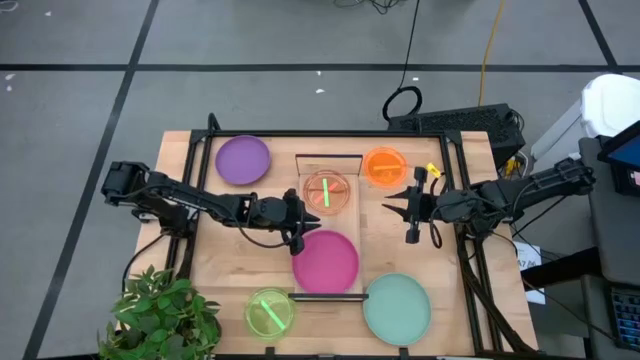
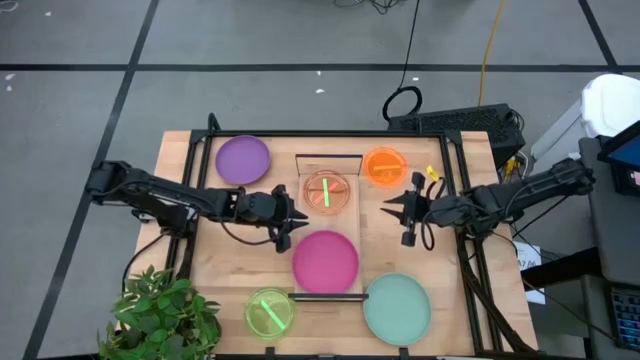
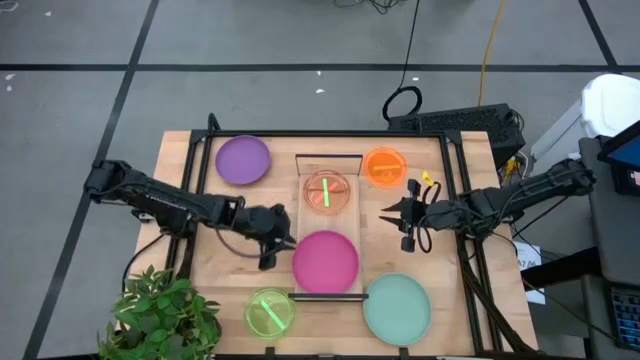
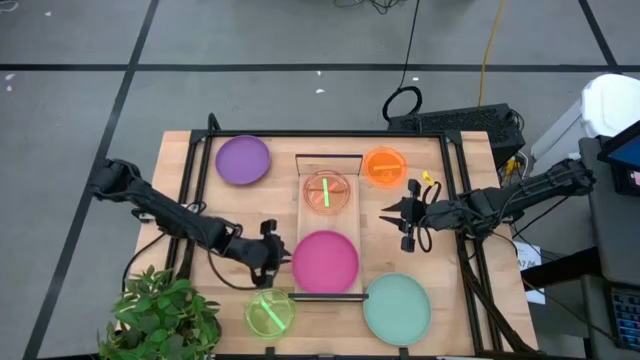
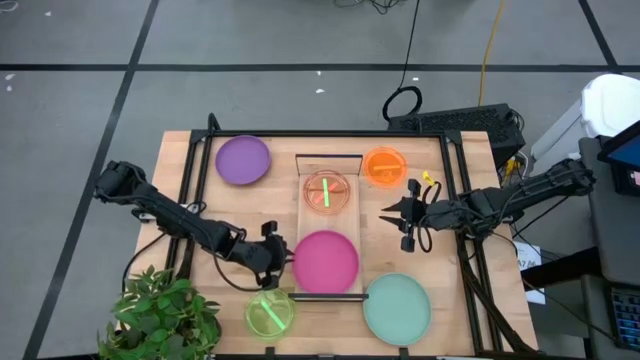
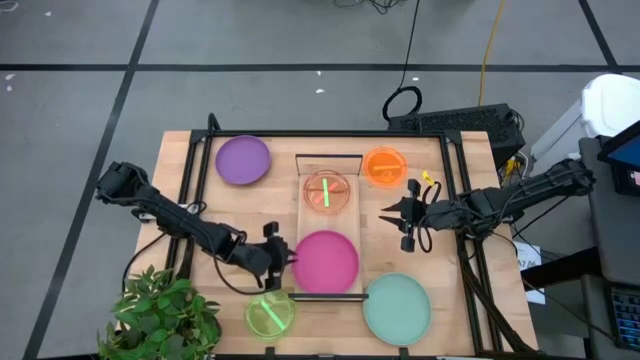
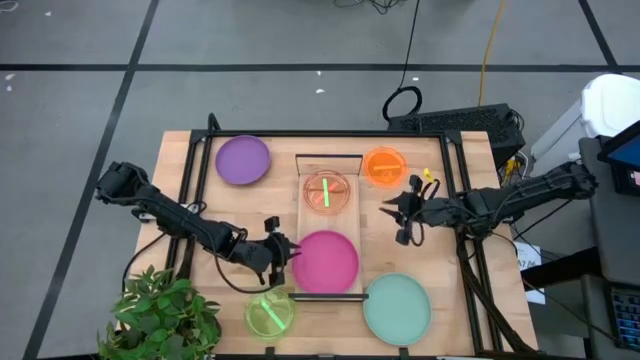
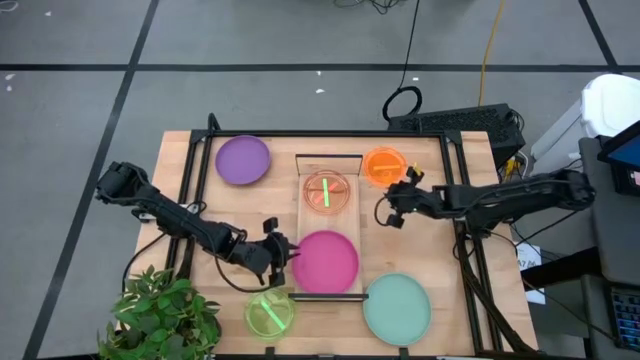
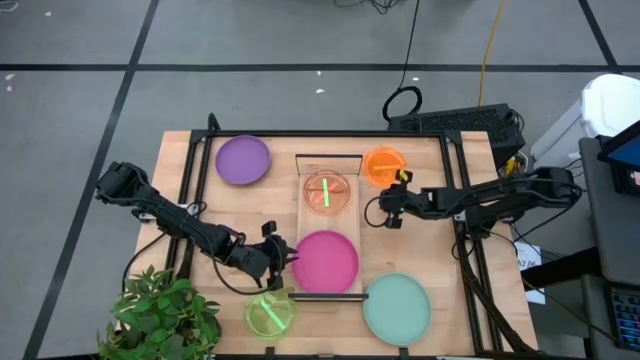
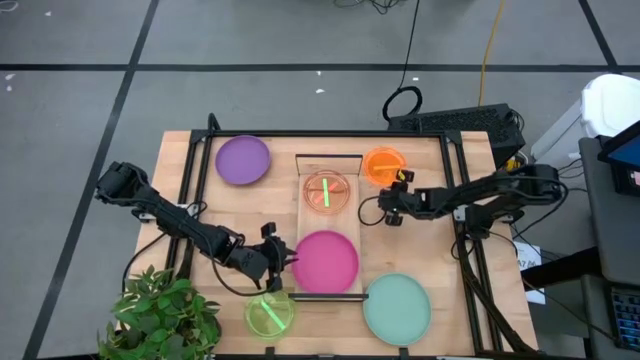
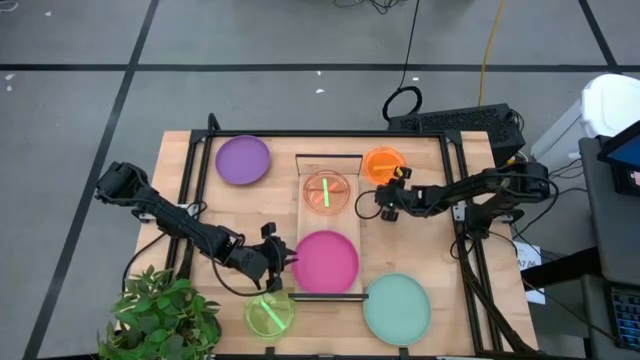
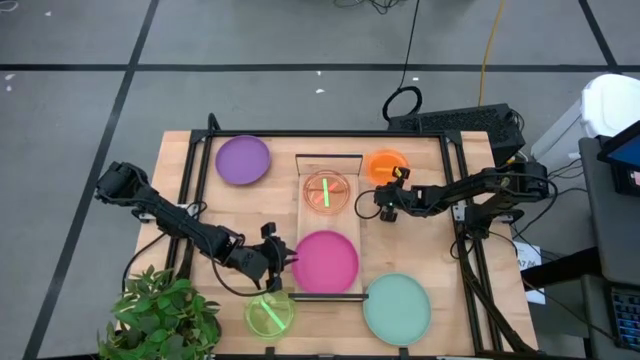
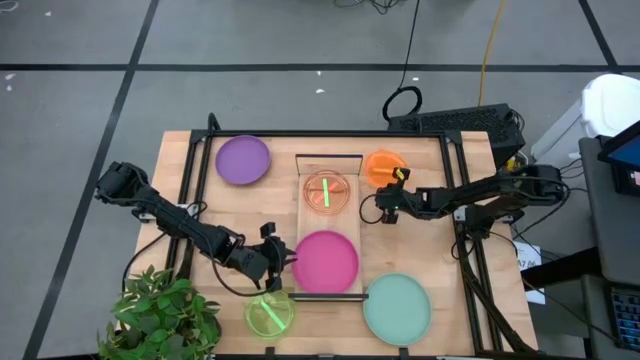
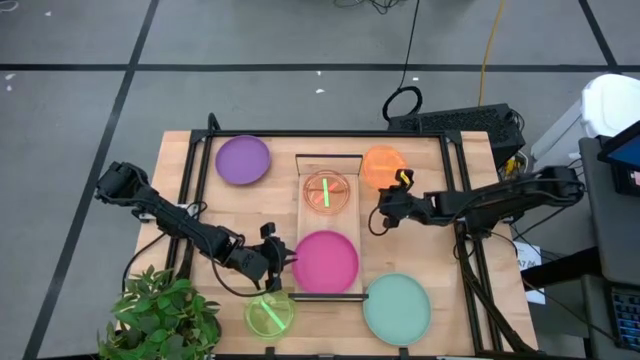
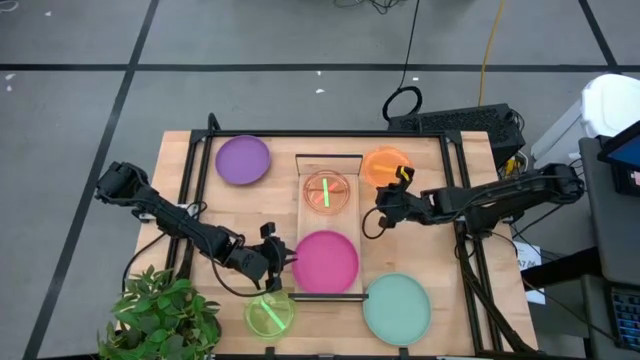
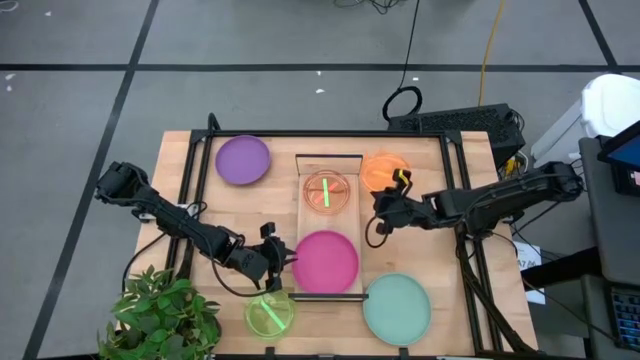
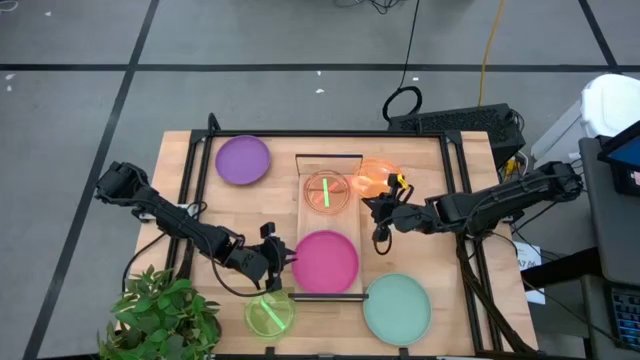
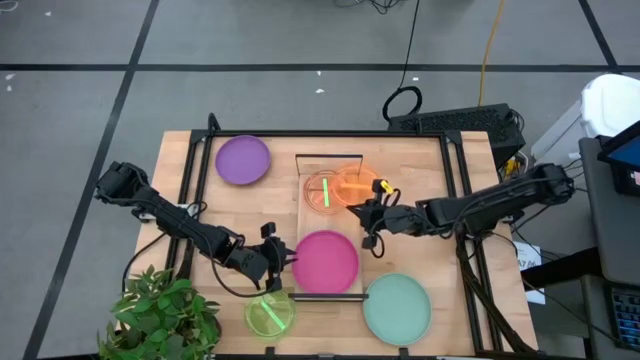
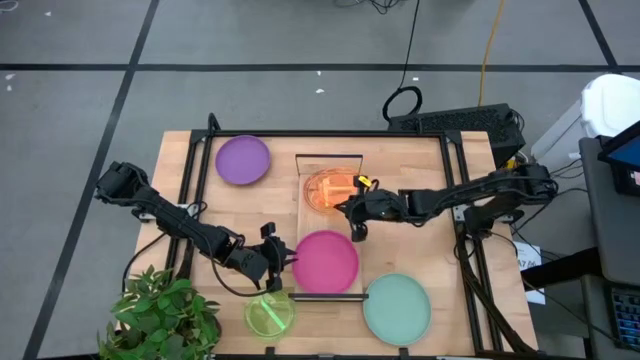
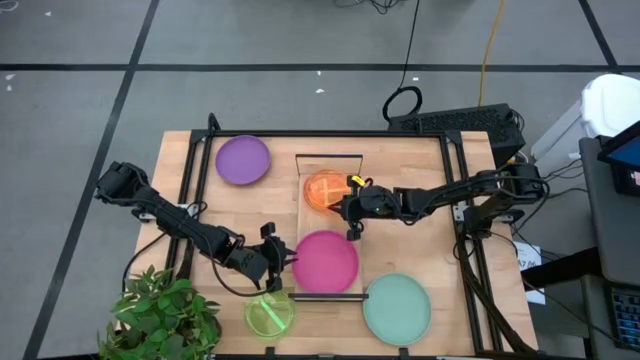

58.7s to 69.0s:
Task: Place and stack plates onto a shelf
Stack the small orange plate on top of the small green plate on the shelf

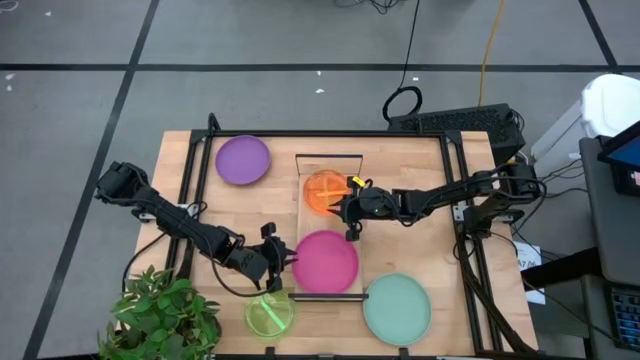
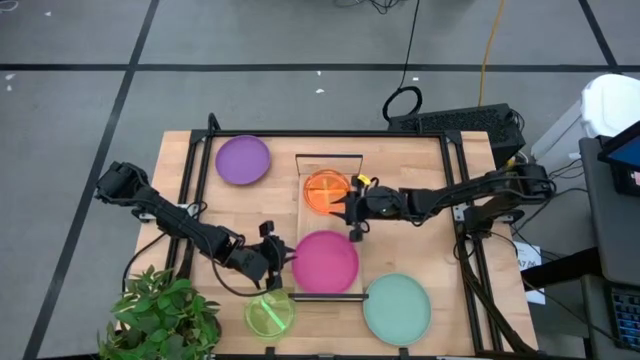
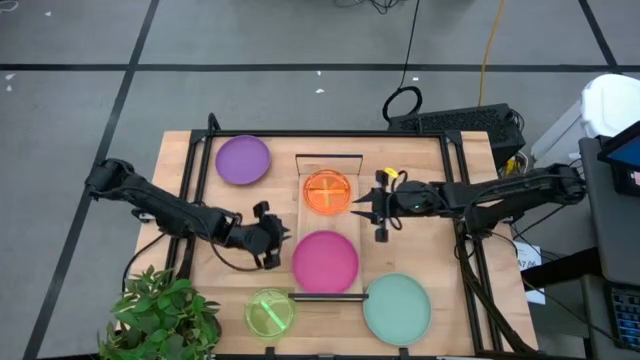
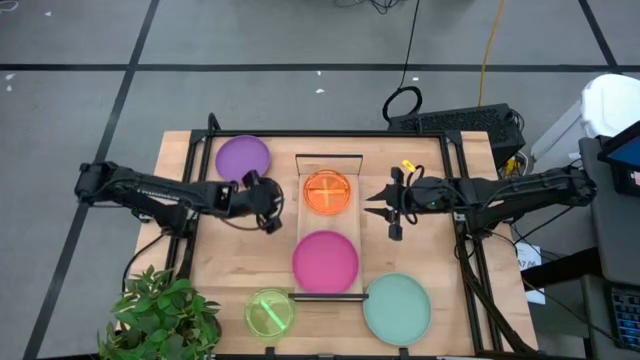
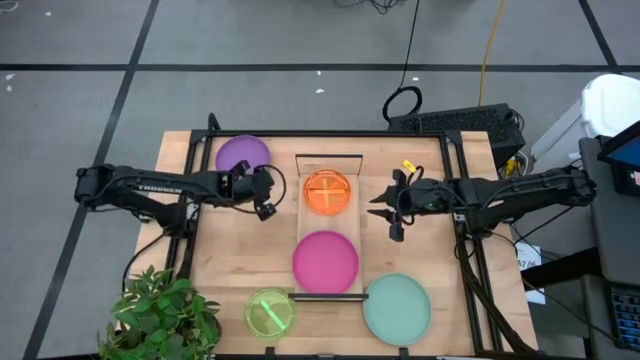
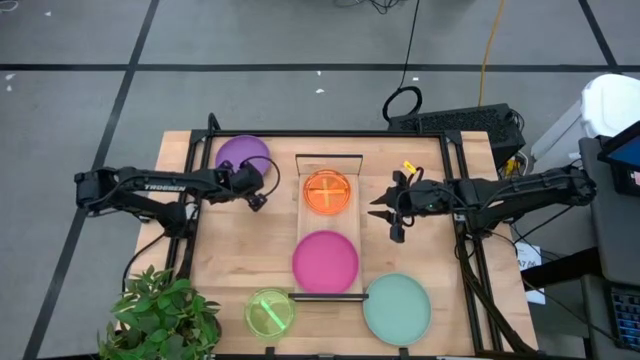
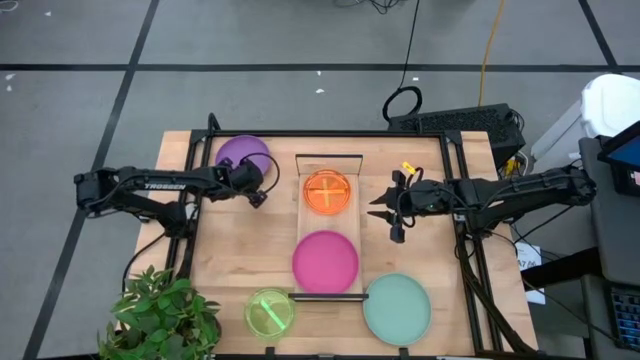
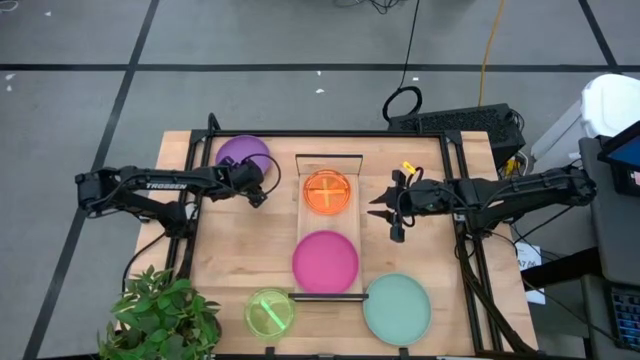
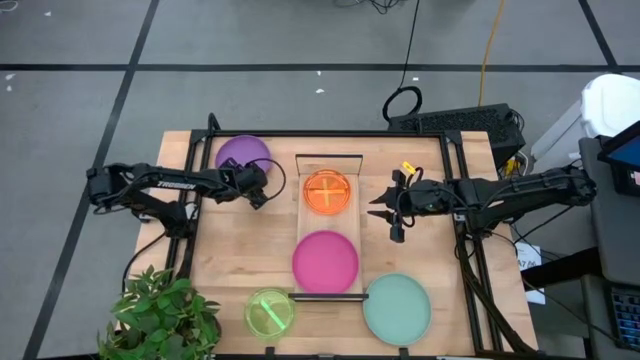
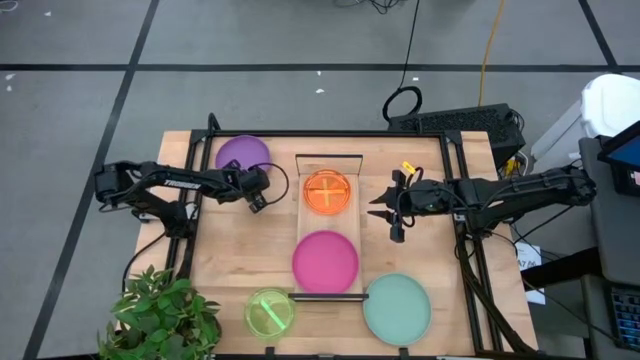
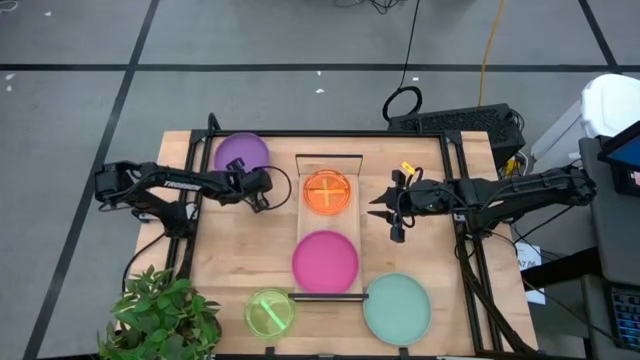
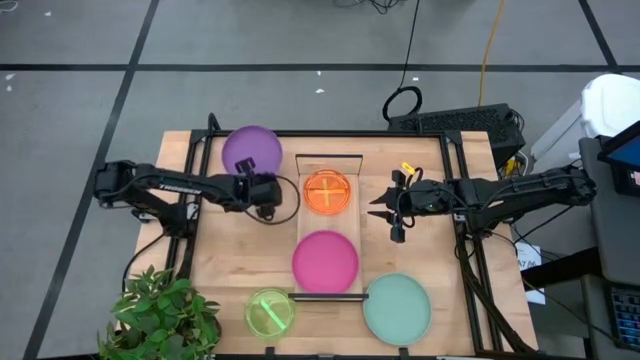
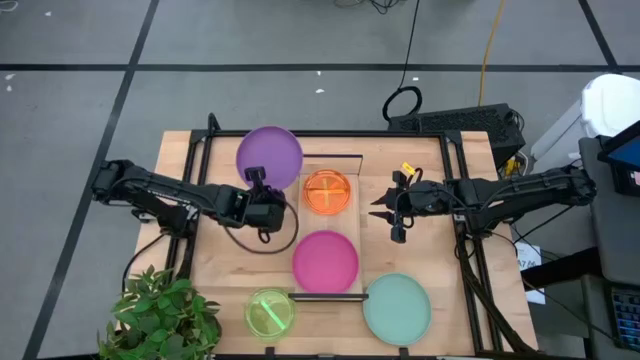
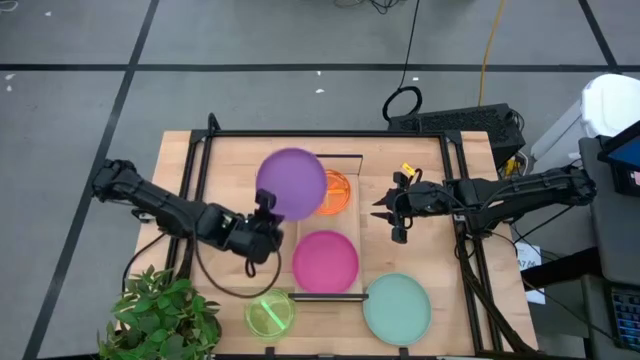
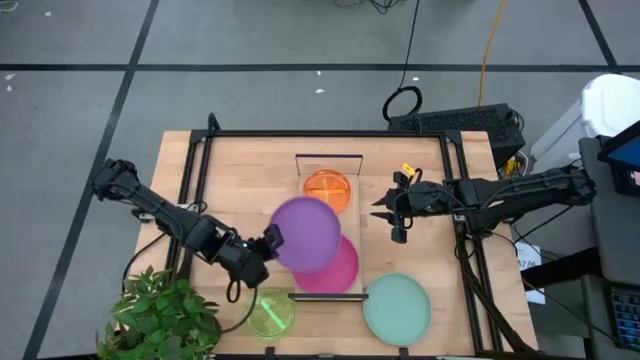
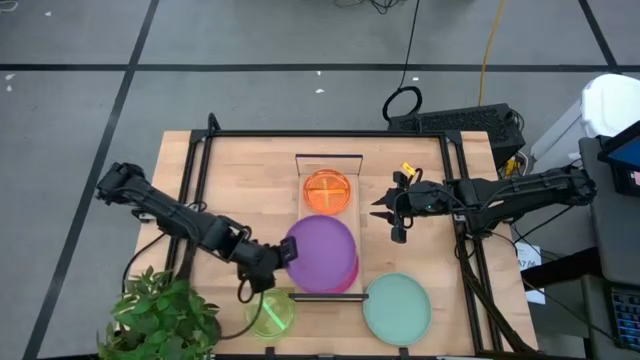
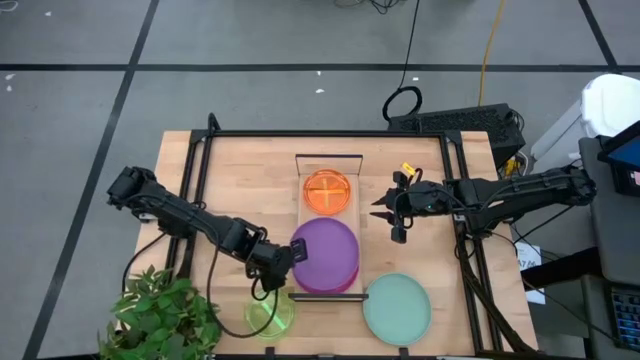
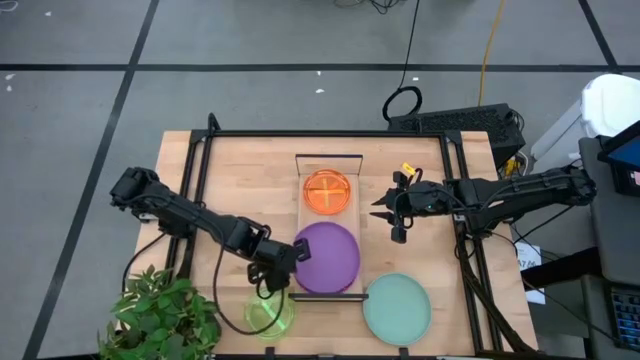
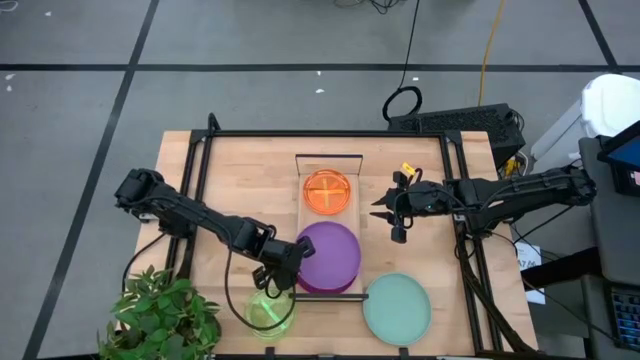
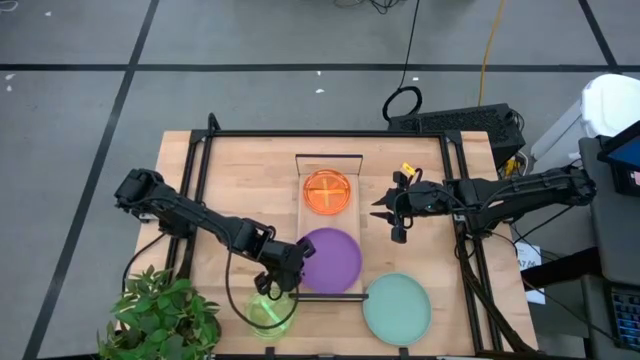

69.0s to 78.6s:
Stack the large purple plate on top of the large pink plate on the shelf

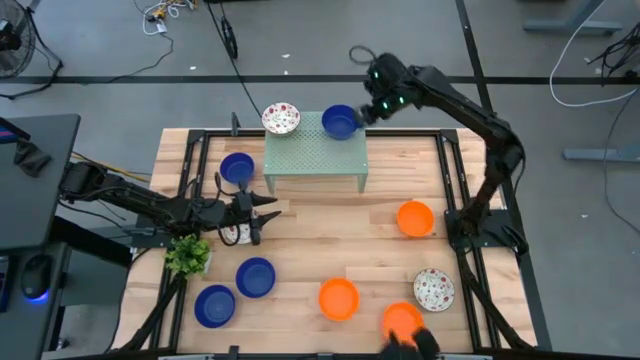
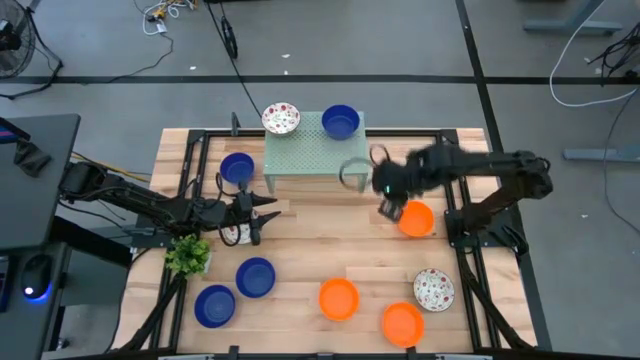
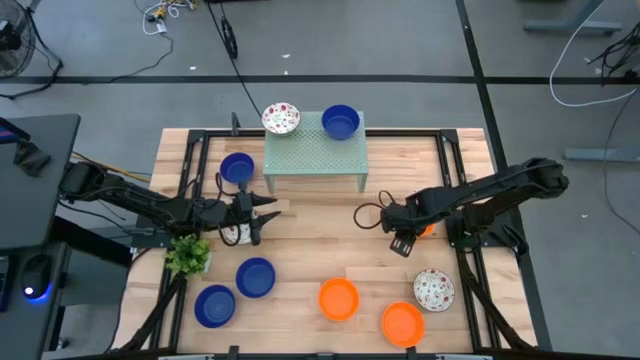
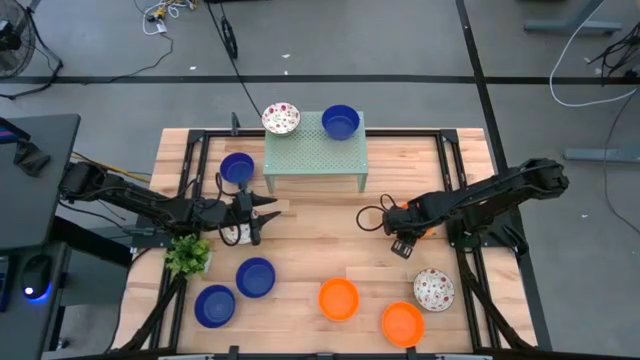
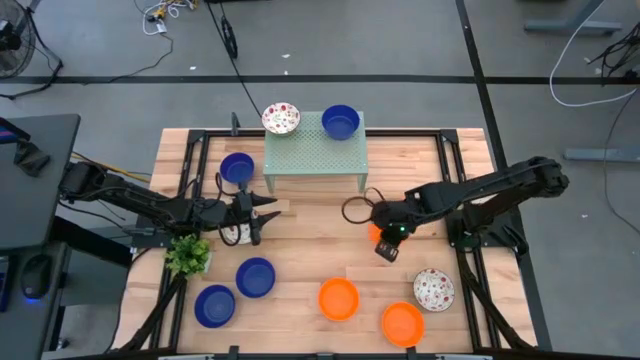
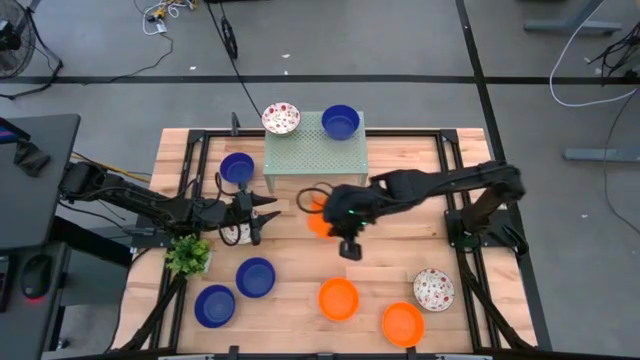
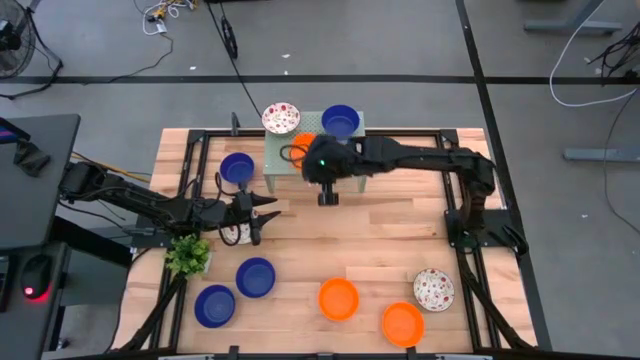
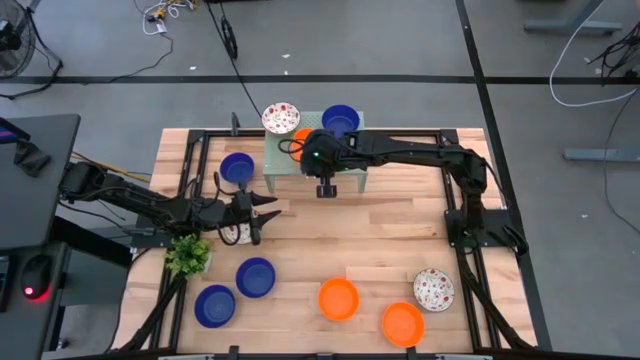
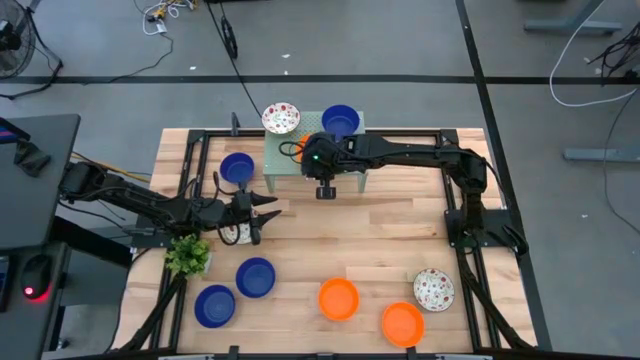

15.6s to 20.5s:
Task: Pick & Place Mini bowls
Put the orange bowl on the shelf
